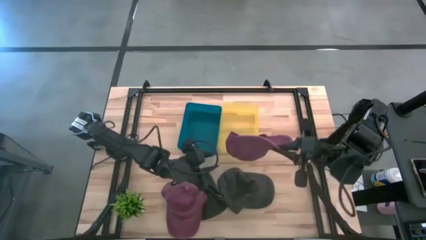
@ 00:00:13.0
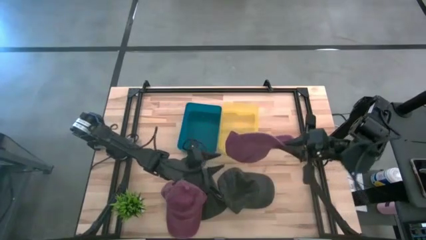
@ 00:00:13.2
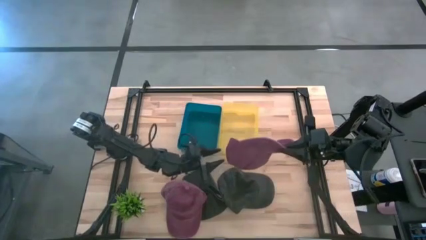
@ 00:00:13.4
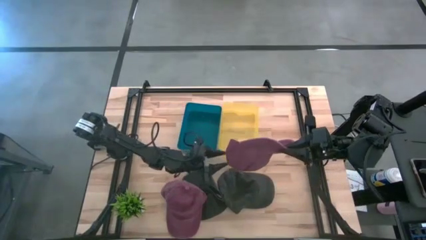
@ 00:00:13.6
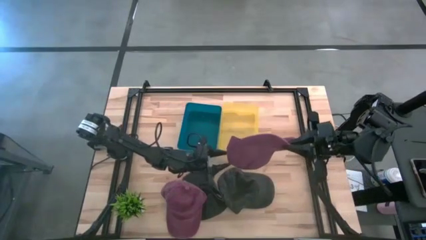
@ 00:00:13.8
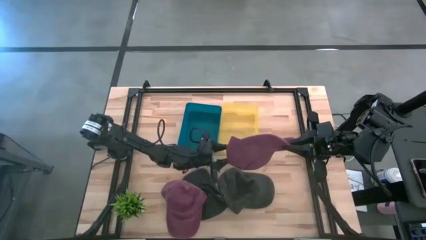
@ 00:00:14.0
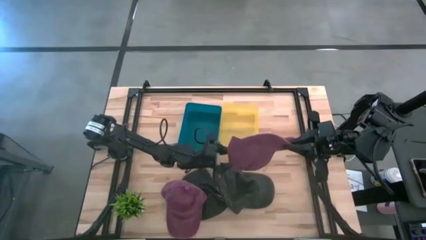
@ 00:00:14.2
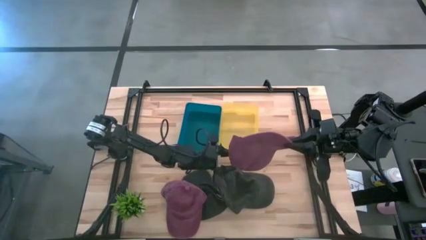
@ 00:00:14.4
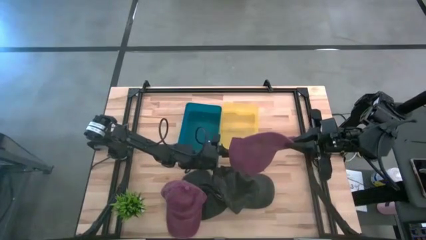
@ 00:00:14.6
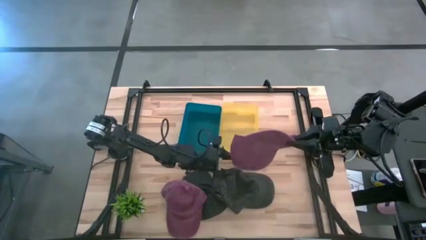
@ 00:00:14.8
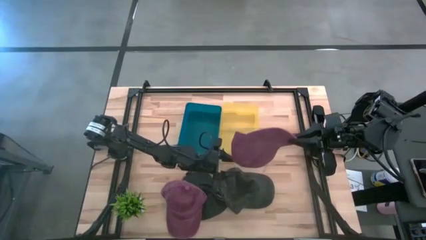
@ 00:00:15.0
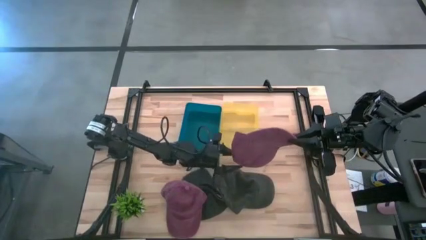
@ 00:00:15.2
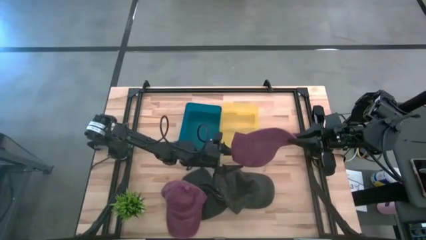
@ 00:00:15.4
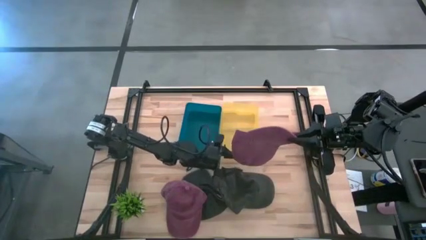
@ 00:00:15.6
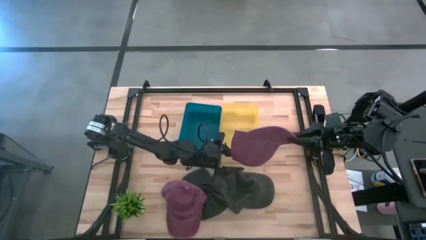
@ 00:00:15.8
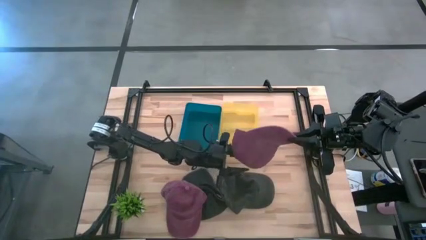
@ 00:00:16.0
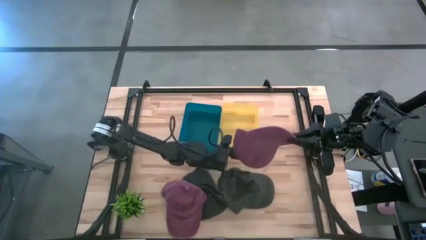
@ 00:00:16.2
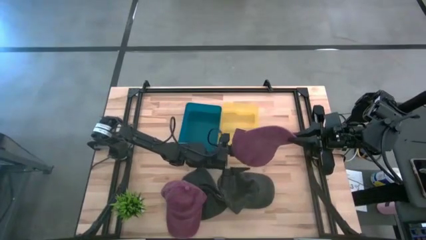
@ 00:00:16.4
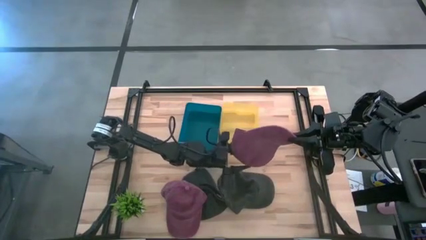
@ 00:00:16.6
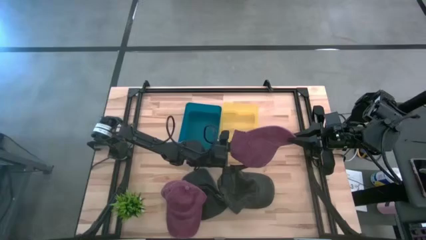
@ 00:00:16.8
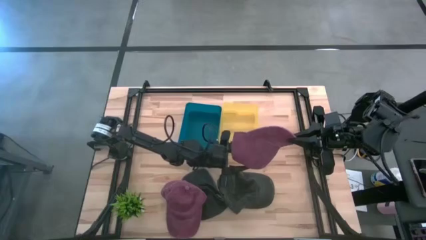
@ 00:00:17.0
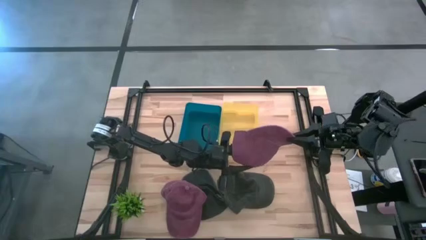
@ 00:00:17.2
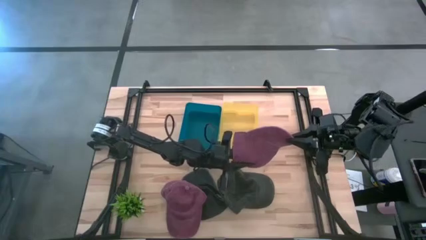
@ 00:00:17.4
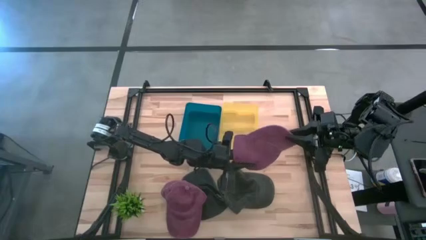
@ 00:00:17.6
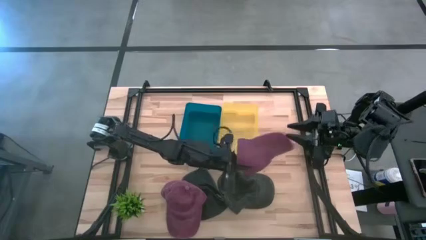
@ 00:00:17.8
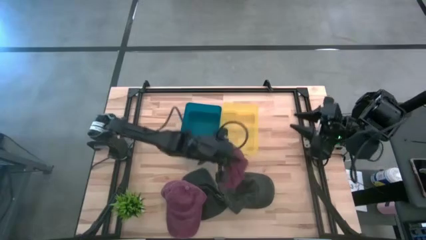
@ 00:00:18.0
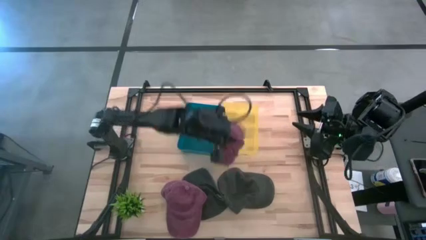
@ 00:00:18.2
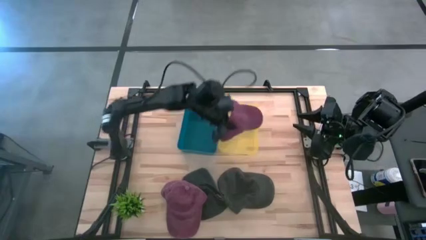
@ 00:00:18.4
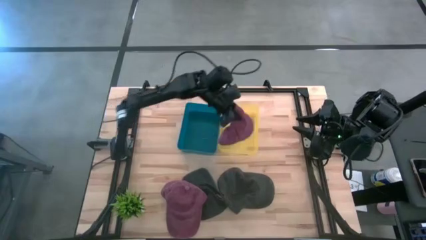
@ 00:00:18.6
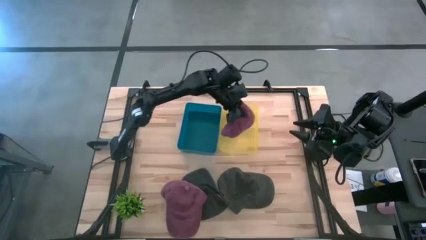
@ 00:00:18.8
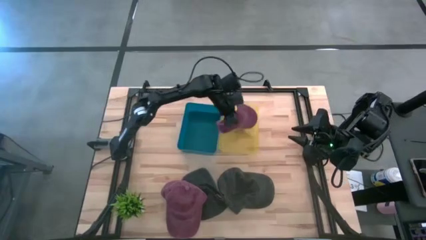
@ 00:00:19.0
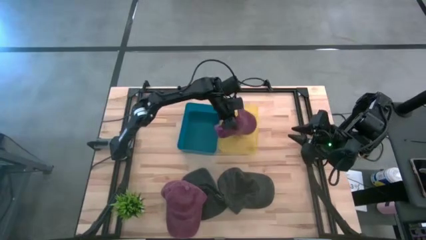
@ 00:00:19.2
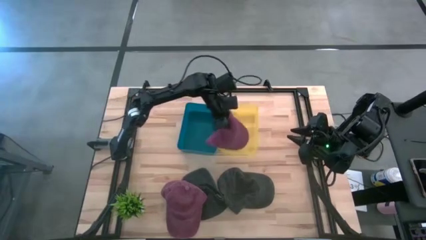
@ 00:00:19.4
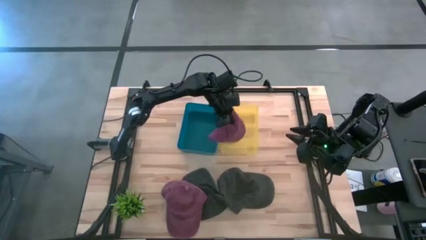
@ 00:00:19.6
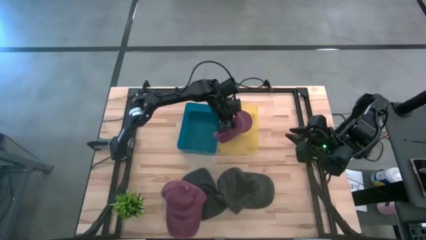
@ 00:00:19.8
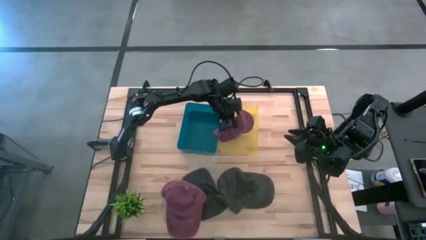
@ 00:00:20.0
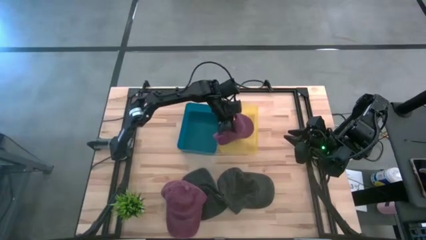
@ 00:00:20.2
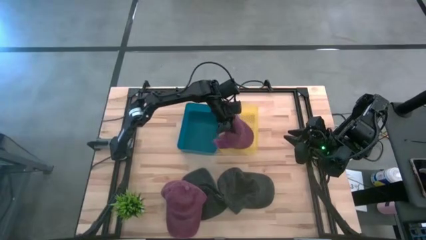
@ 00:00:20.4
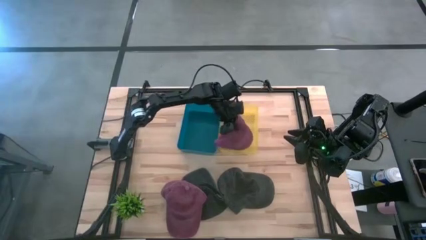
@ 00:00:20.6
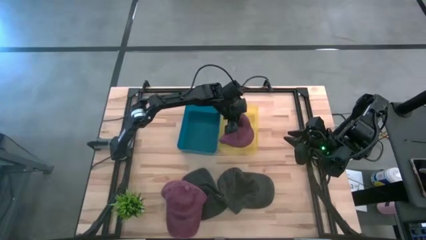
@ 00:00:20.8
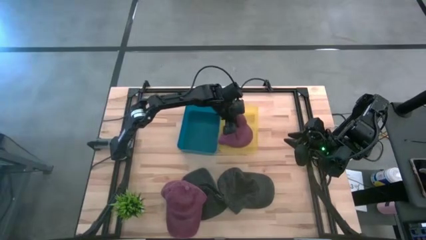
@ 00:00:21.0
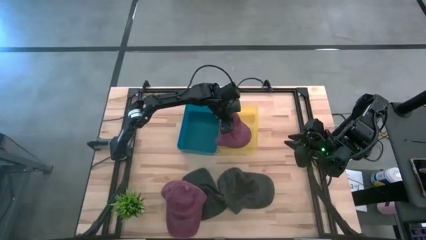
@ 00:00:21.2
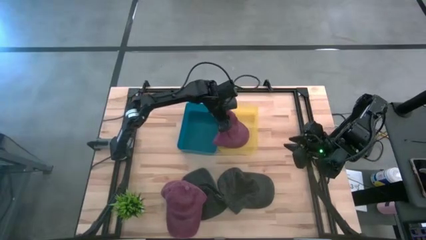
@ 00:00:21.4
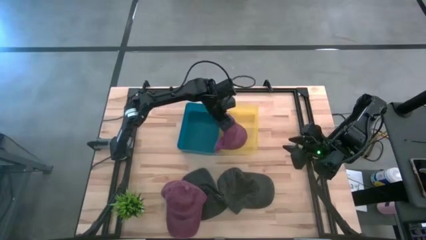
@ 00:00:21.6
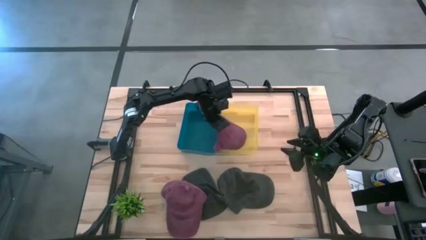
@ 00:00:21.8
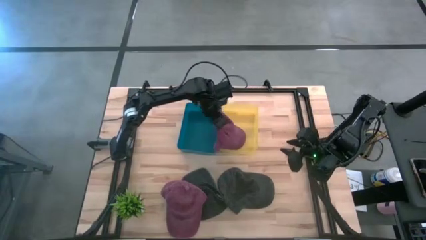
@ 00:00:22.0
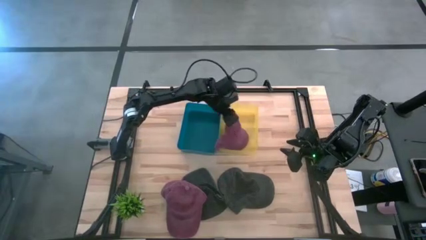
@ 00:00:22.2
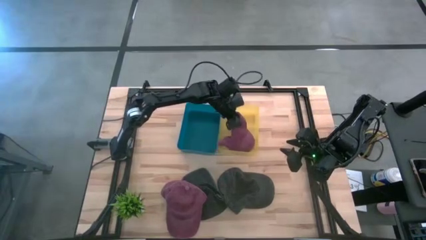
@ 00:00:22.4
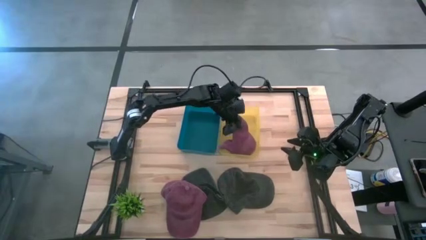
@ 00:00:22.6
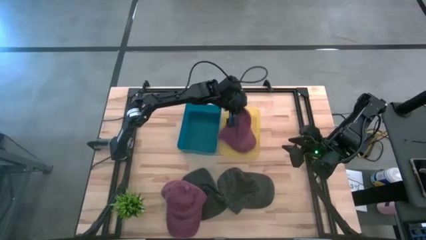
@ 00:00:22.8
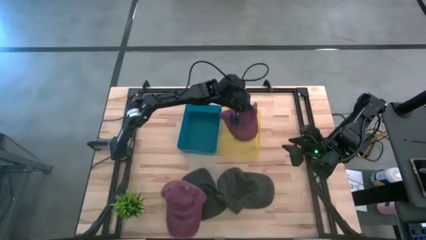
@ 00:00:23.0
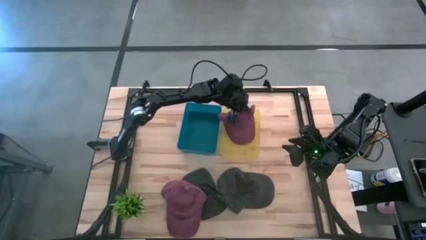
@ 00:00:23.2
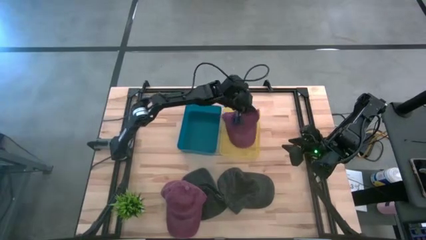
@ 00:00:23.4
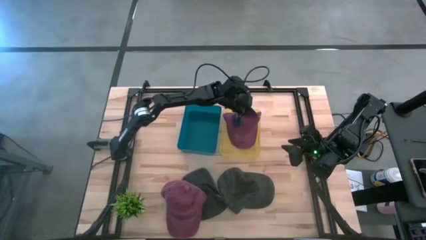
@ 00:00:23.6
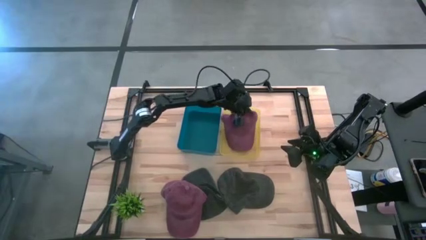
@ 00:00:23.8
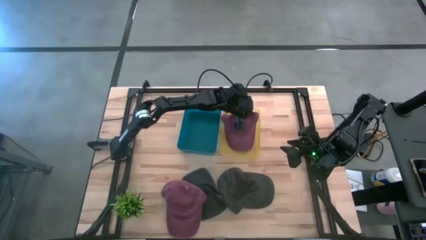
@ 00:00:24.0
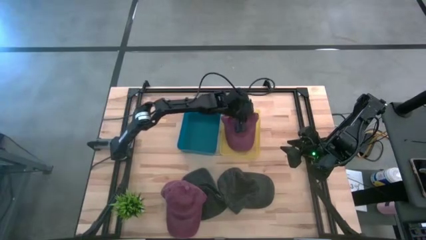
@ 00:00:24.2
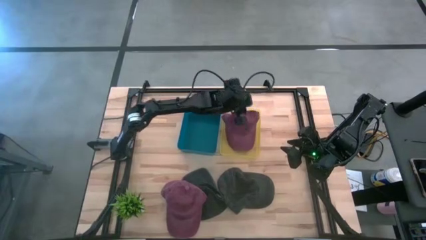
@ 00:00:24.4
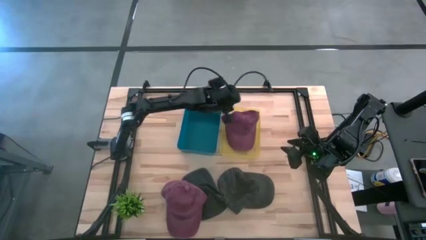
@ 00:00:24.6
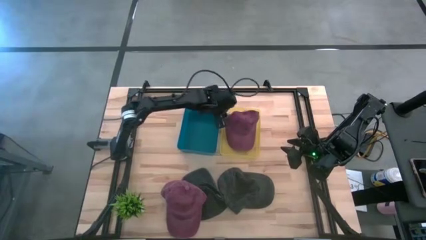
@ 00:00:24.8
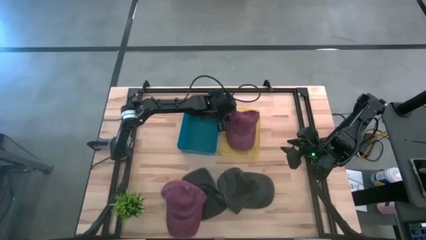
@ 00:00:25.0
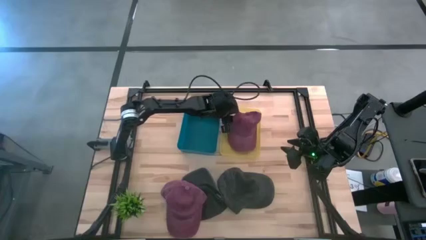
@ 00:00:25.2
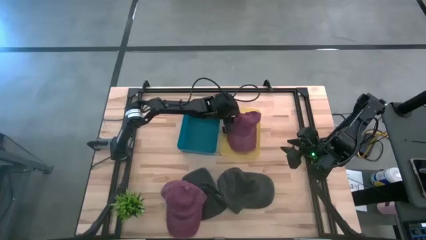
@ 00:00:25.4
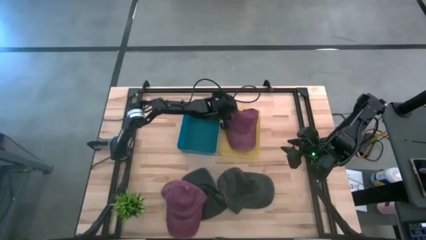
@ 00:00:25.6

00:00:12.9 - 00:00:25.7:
Task: Pick & Place hat
Put the right red cap into the yellow bin

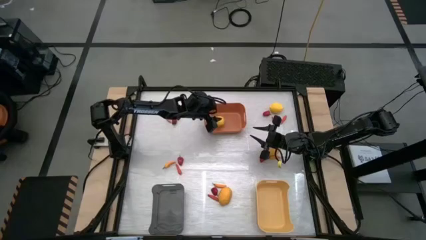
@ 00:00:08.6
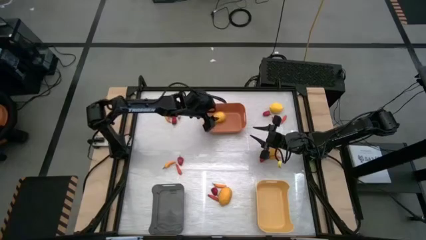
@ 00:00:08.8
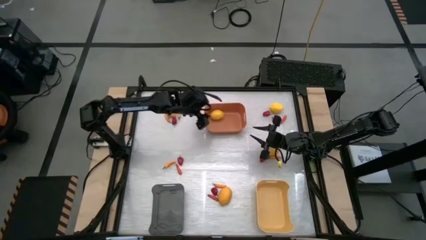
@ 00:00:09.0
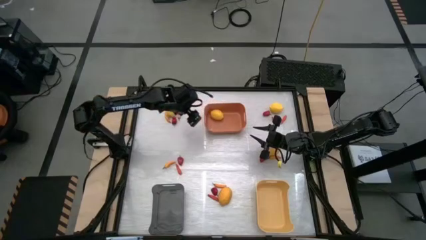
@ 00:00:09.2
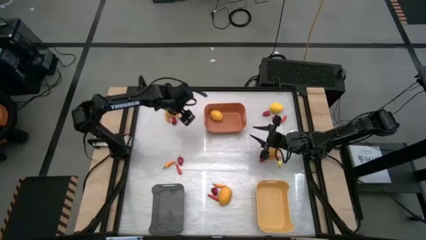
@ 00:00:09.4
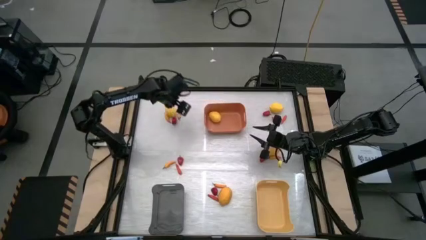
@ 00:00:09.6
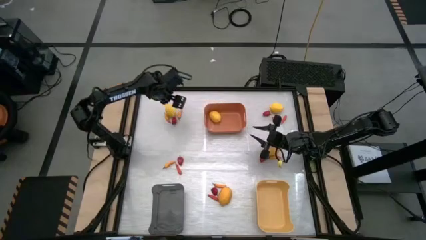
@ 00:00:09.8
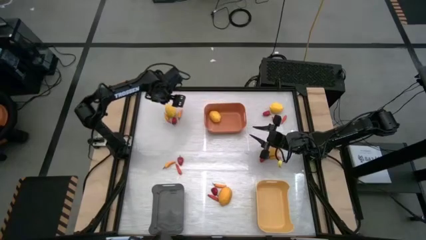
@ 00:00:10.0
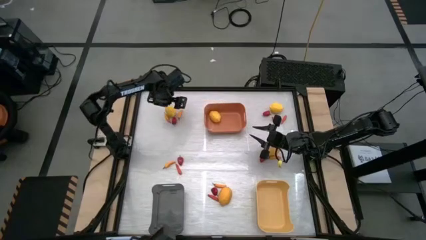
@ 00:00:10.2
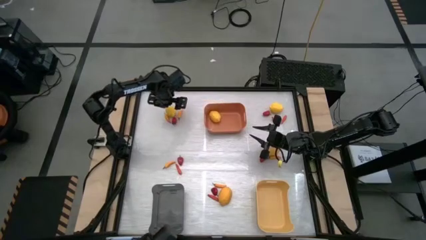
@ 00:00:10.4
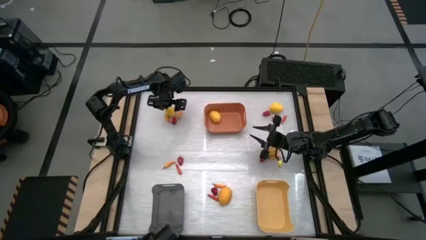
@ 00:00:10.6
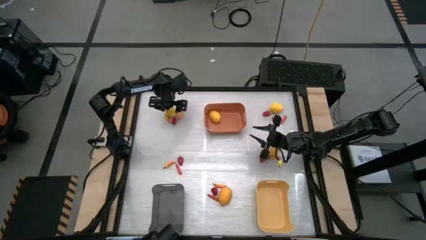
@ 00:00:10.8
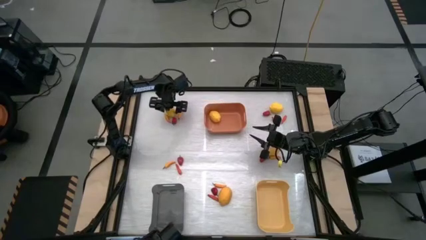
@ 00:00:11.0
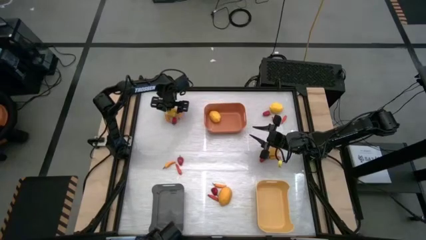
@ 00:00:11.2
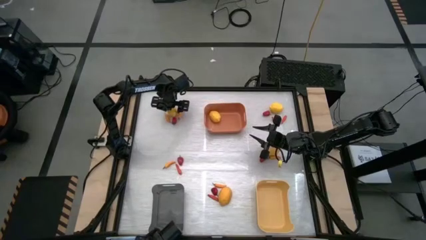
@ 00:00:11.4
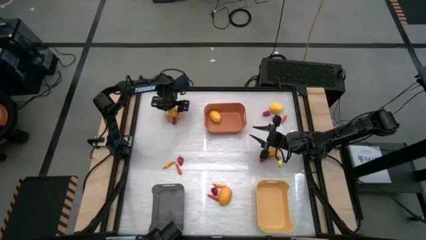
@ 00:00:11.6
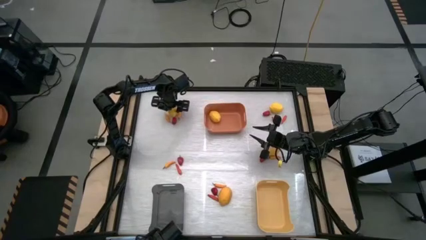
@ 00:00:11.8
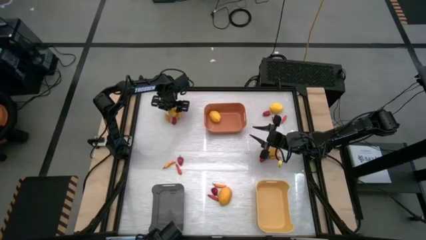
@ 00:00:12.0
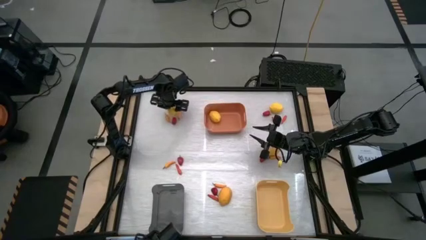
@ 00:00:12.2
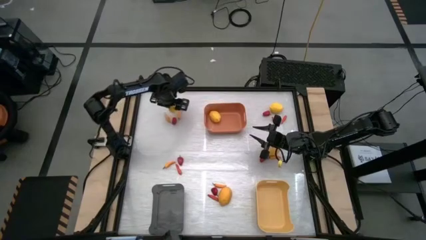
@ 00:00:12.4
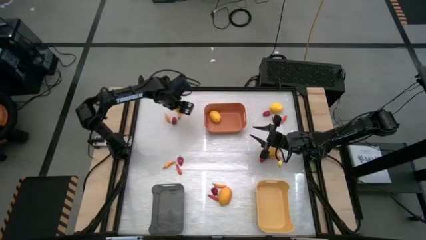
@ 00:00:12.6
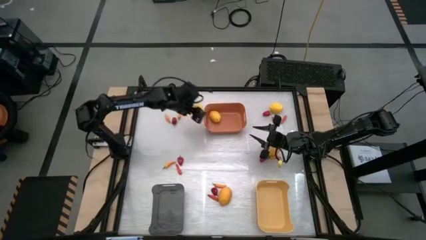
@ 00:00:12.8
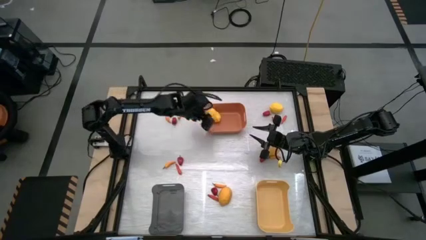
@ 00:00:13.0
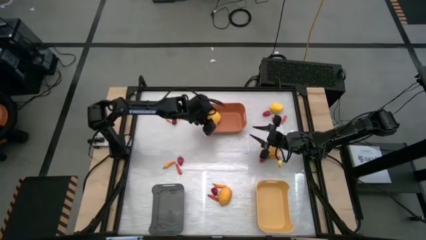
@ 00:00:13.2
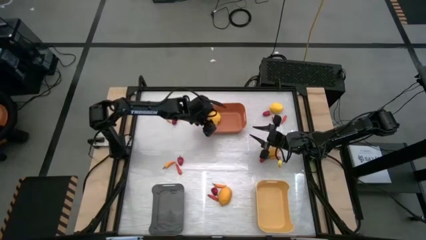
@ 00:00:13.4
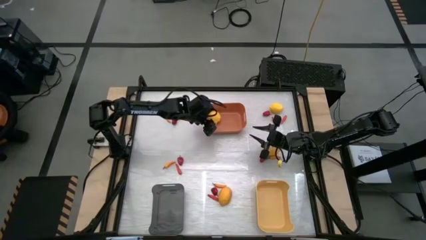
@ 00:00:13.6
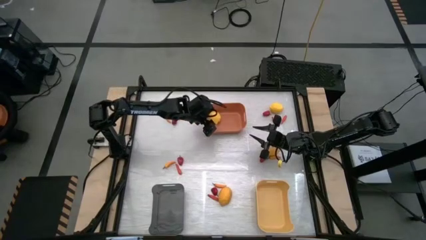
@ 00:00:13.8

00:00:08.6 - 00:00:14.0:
Task: Sort produce into baskets
Put the yellow lemon into the orange bin
